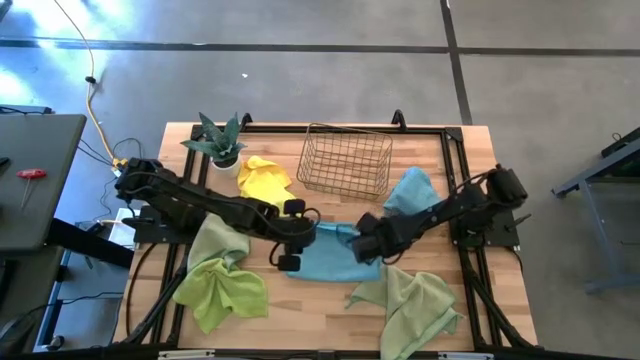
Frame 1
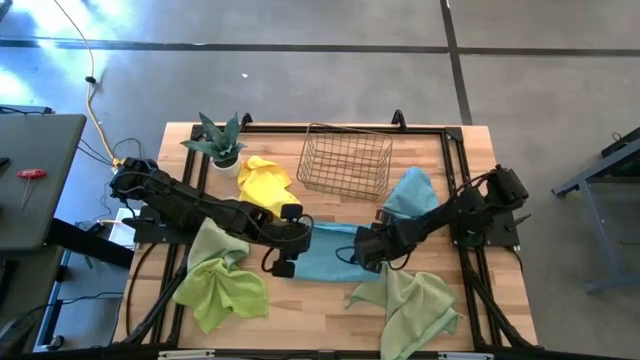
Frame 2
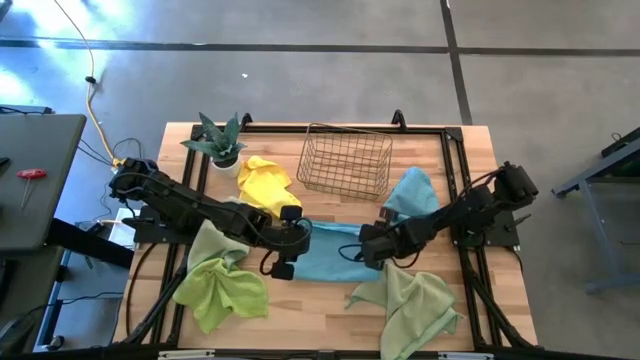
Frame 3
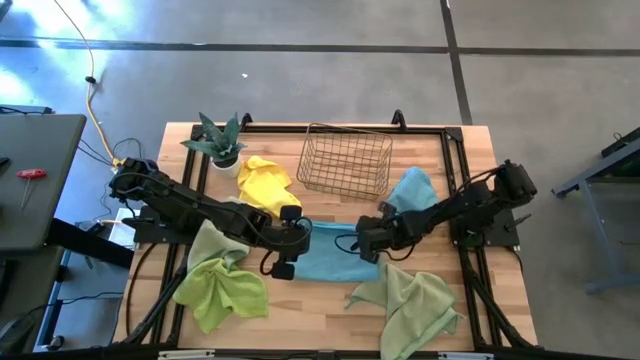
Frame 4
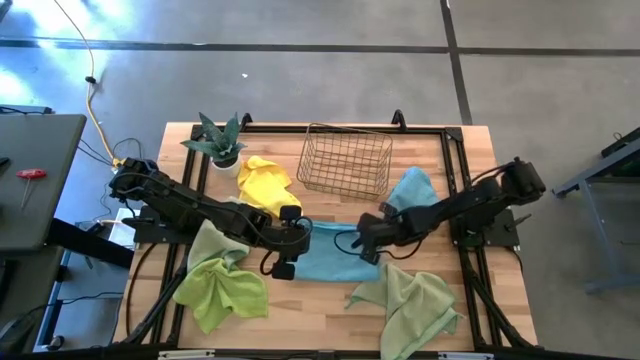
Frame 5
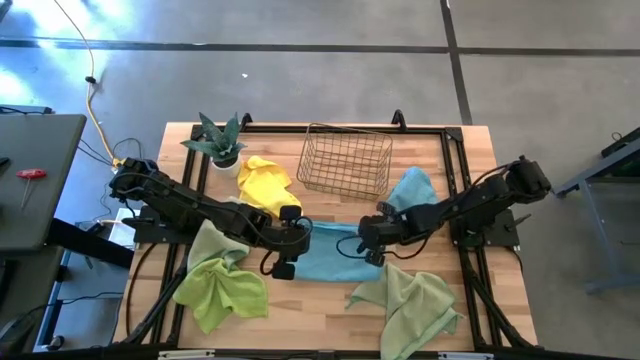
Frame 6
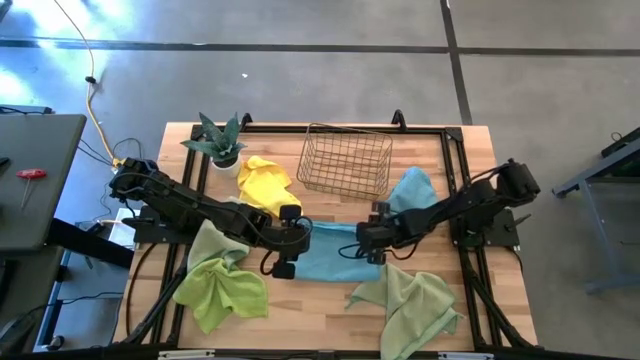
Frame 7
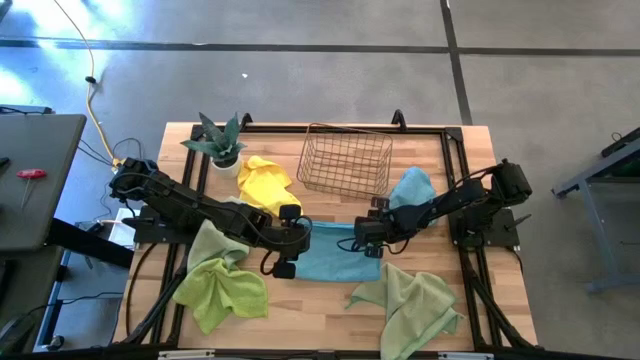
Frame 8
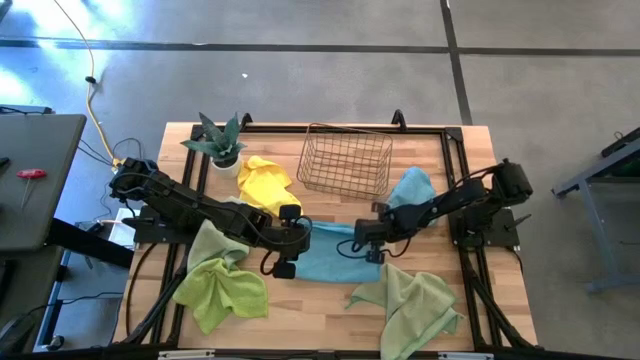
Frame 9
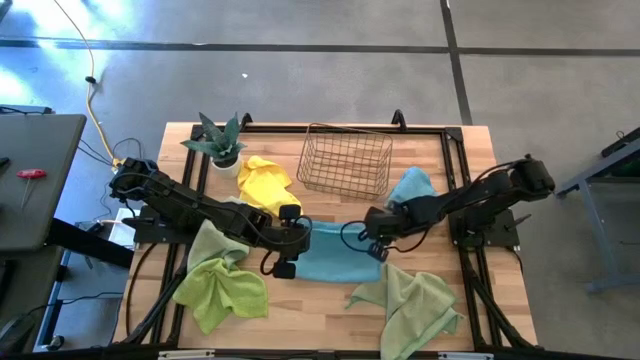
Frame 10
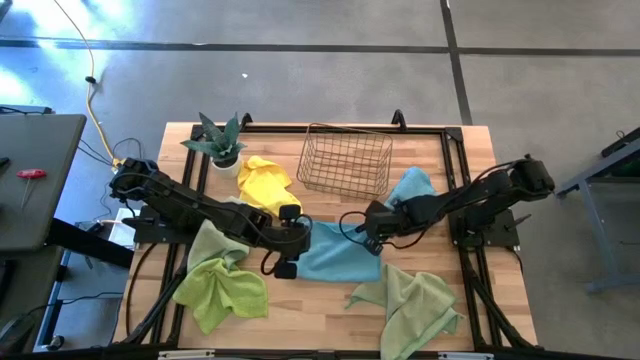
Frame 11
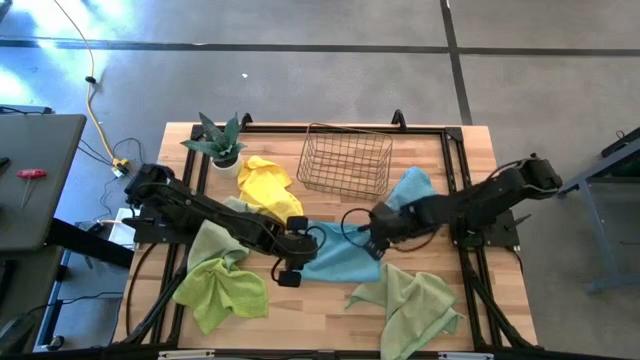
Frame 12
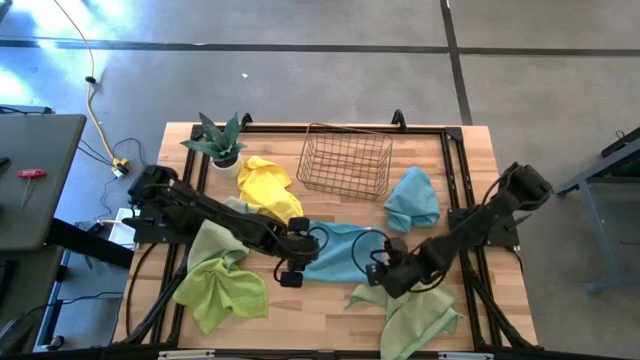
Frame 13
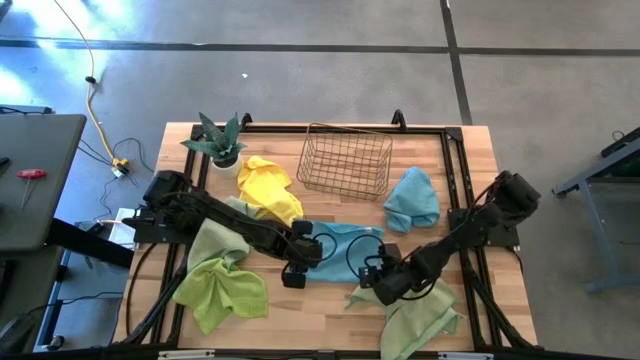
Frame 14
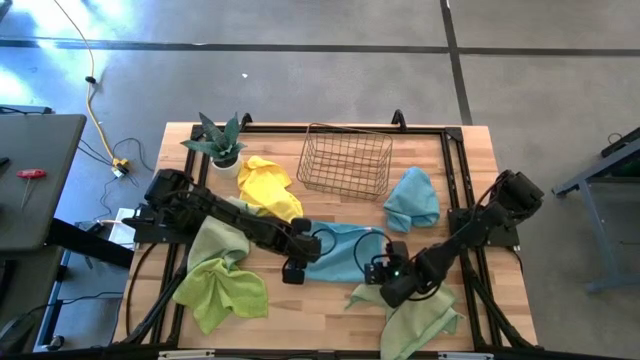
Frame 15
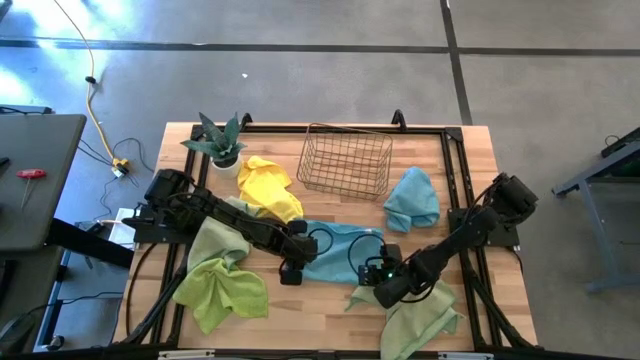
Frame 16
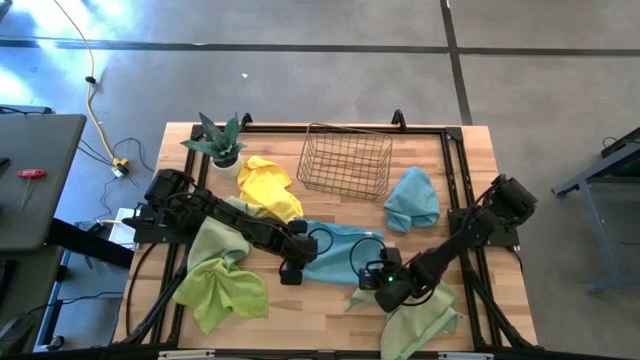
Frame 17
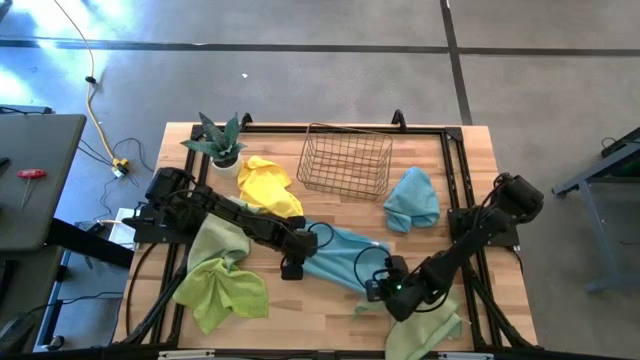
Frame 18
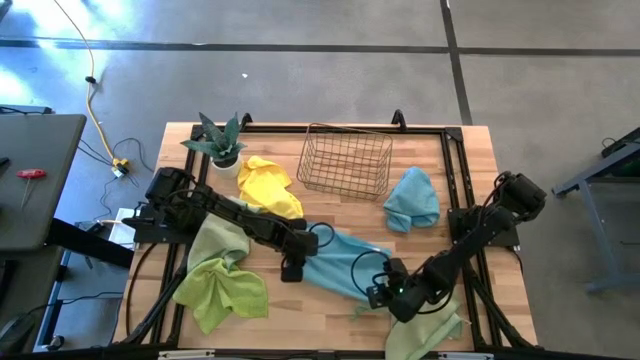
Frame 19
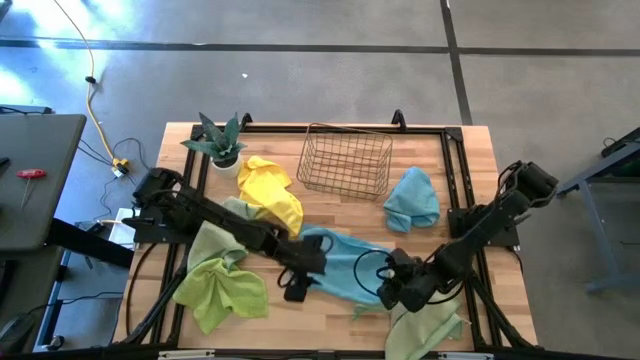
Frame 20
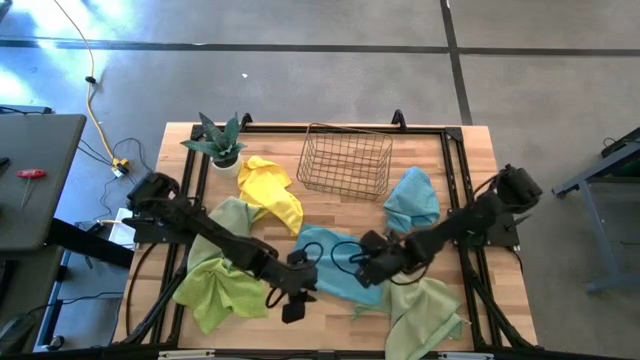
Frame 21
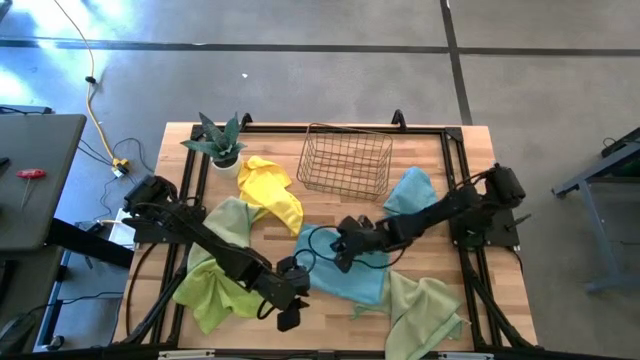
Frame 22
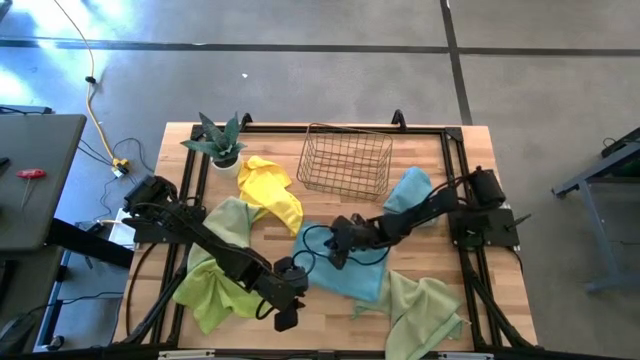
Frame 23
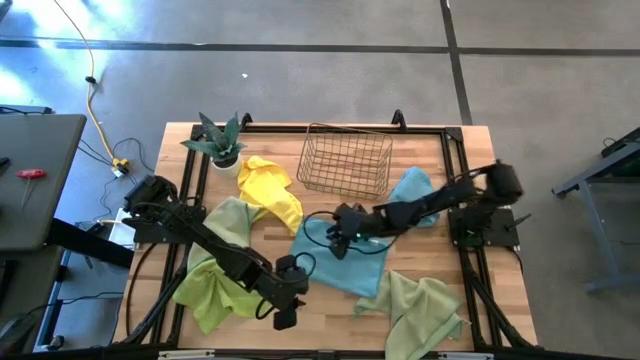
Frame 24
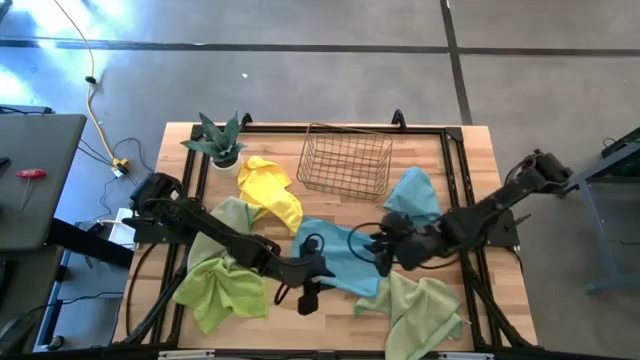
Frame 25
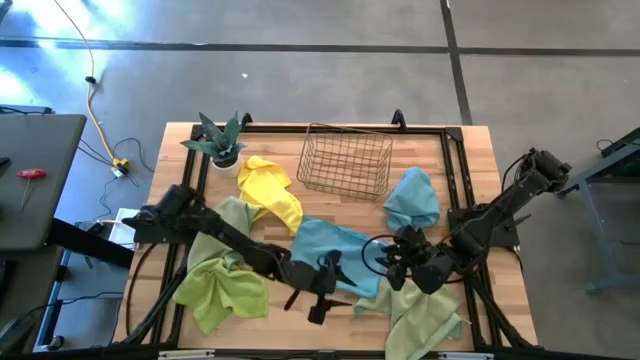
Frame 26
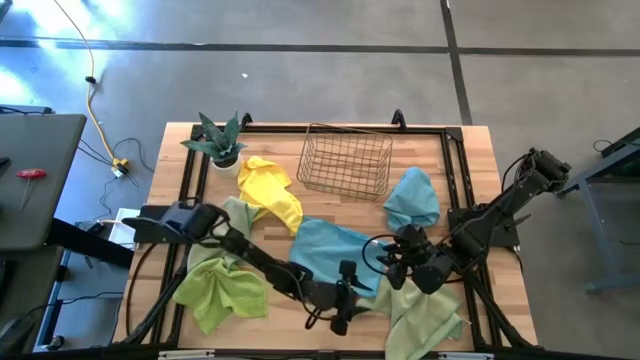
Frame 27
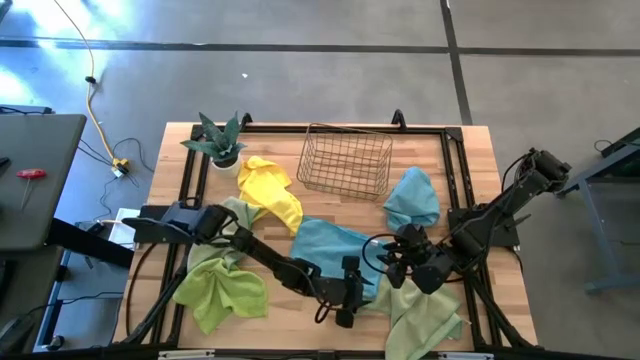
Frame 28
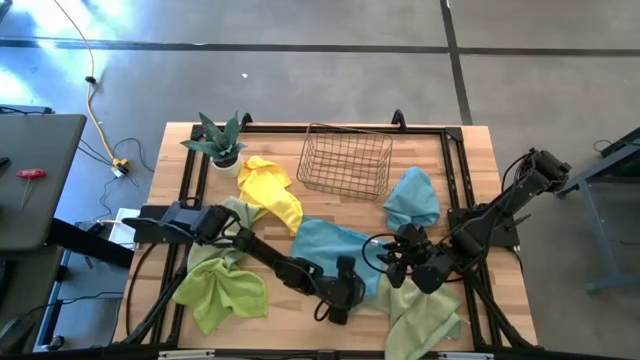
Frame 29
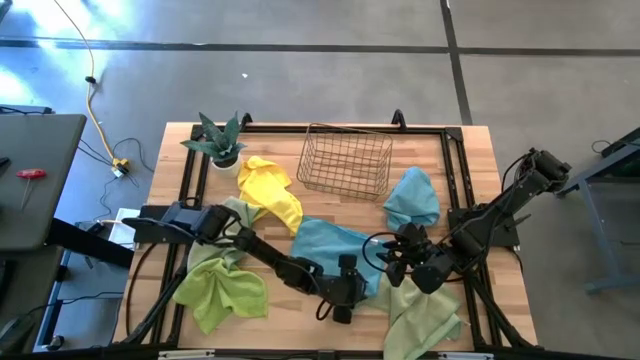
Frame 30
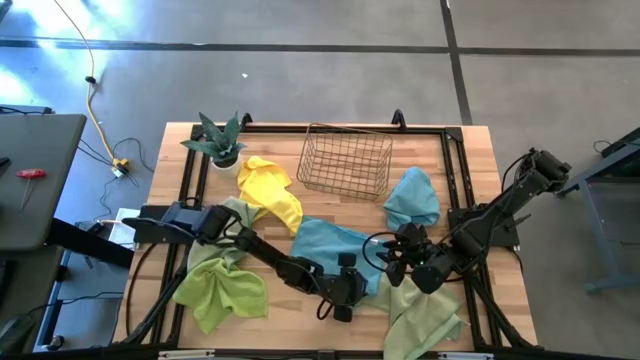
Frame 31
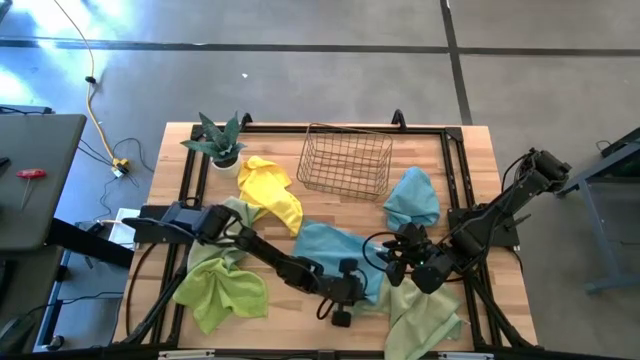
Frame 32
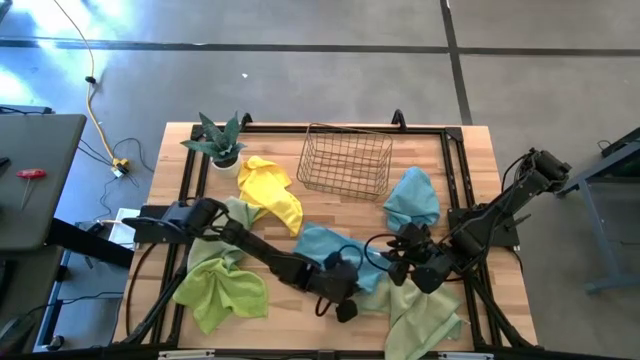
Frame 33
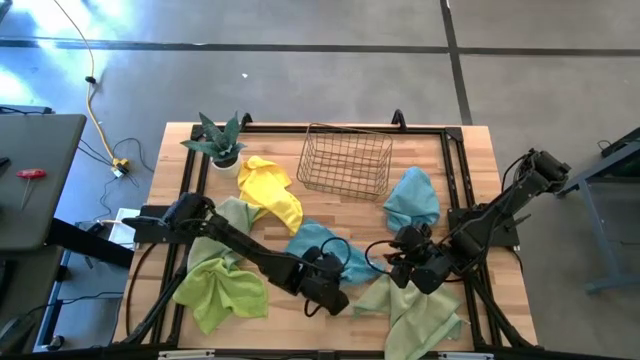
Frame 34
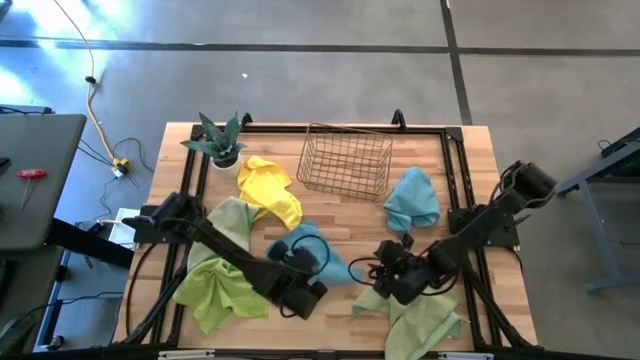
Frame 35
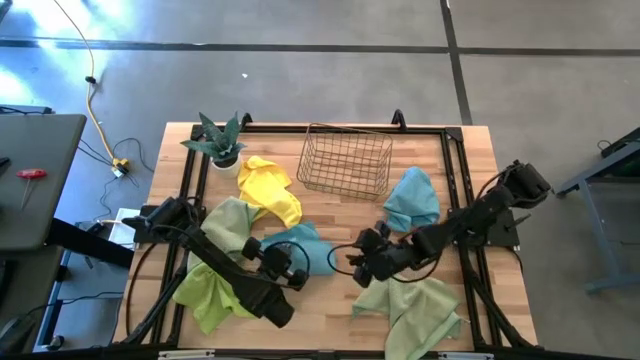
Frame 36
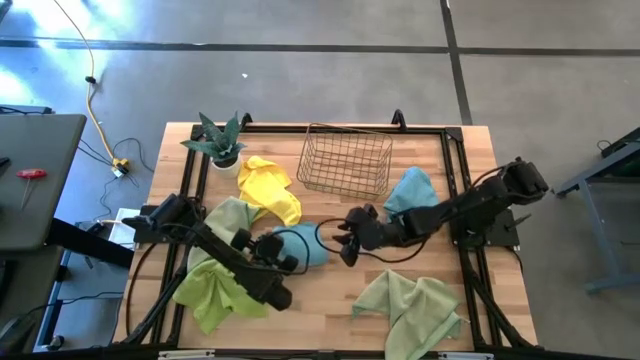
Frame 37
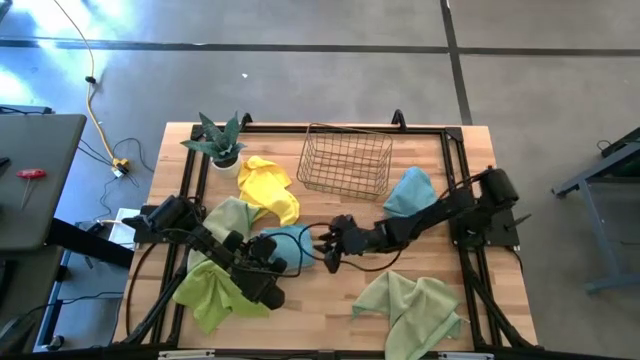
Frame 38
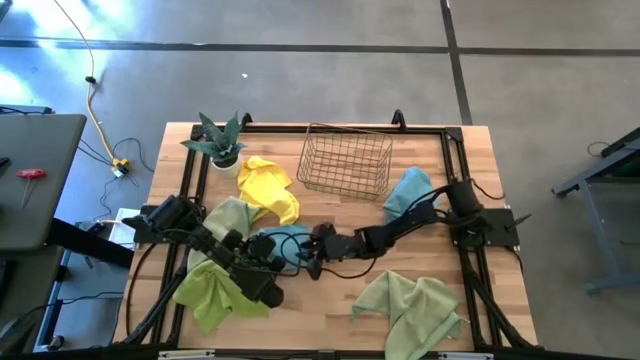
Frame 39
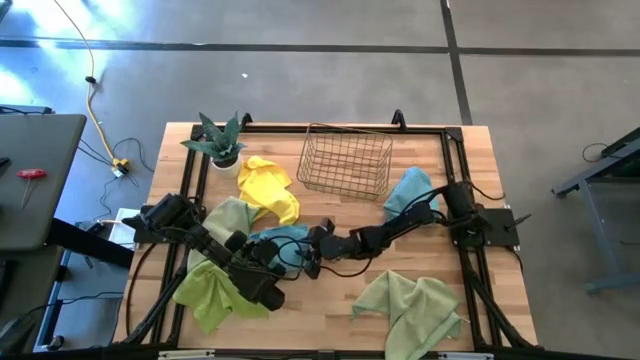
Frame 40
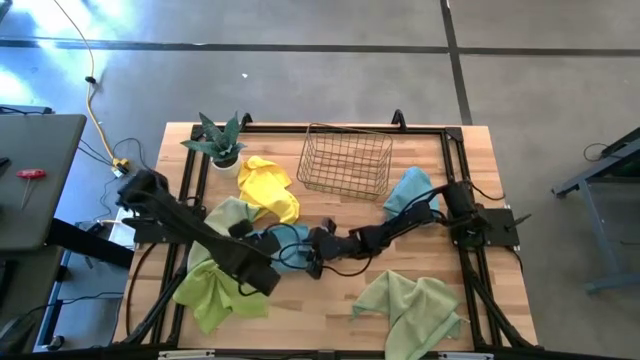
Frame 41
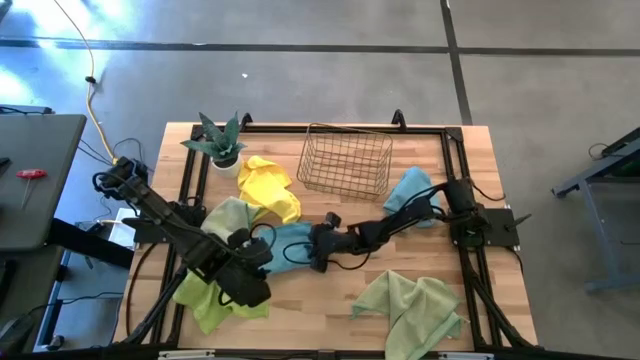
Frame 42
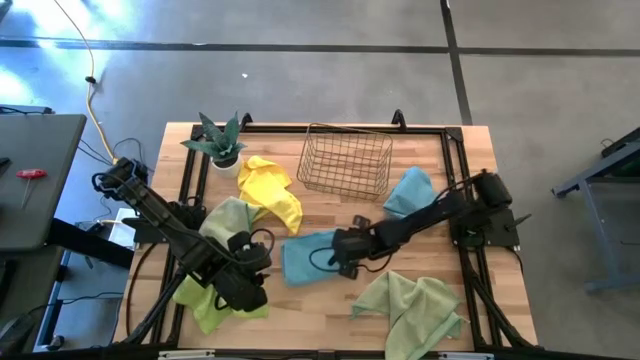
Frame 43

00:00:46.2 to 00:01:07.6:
Task: Fold microfiber towels
Fold the bottom blue microfiber cloth
